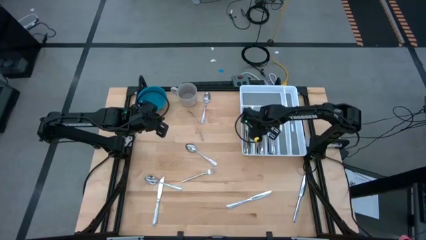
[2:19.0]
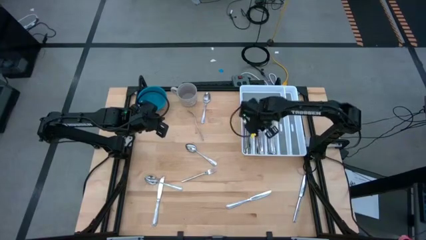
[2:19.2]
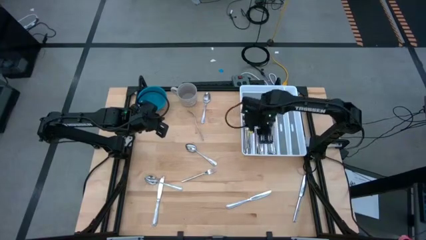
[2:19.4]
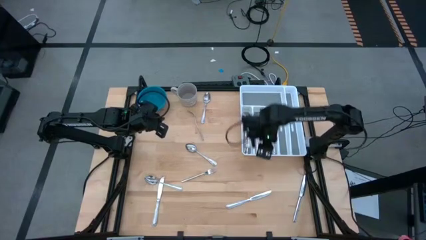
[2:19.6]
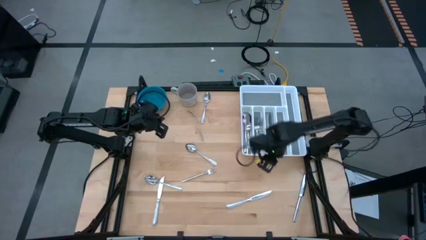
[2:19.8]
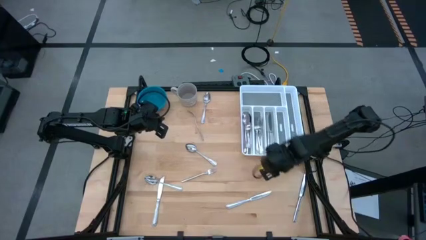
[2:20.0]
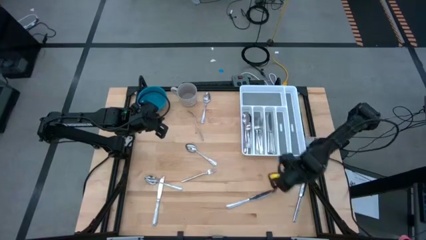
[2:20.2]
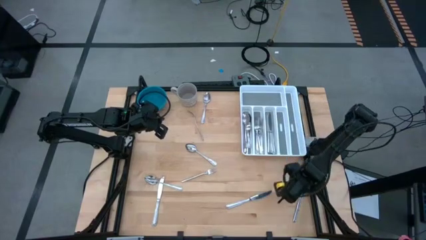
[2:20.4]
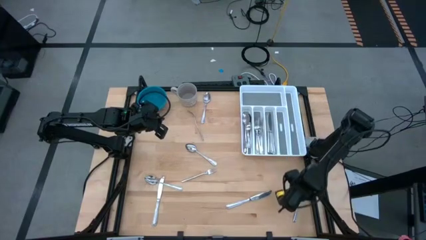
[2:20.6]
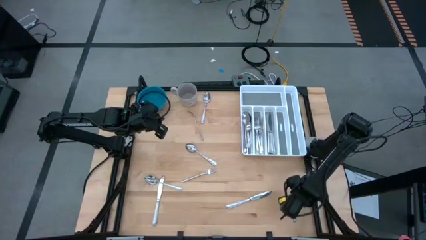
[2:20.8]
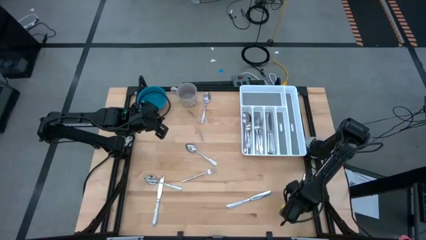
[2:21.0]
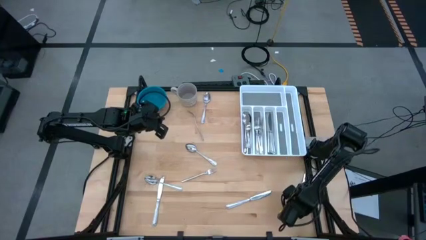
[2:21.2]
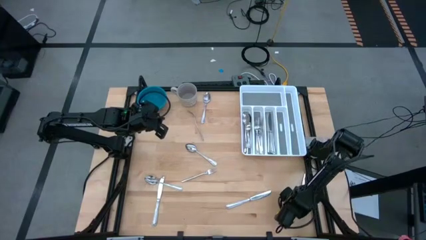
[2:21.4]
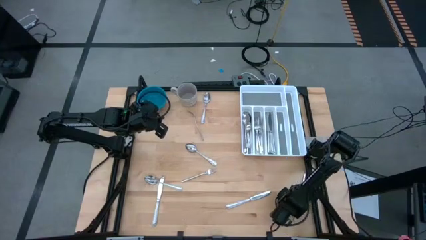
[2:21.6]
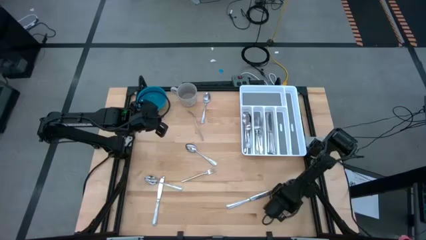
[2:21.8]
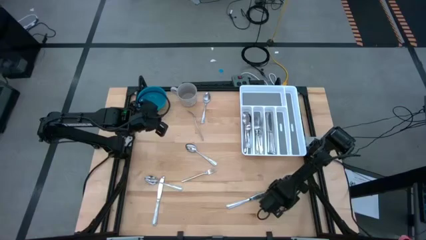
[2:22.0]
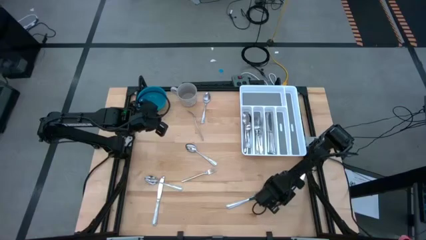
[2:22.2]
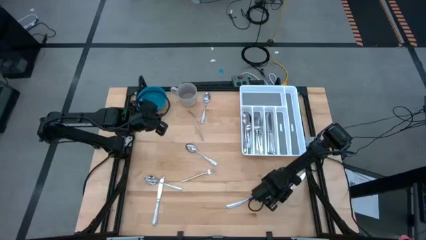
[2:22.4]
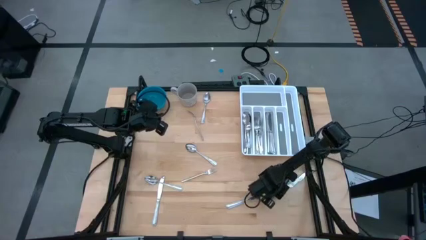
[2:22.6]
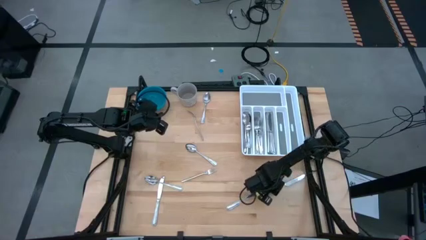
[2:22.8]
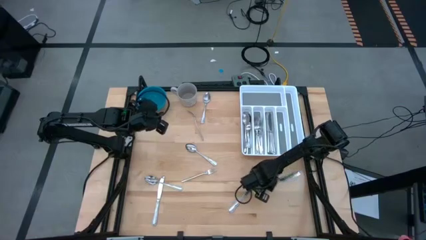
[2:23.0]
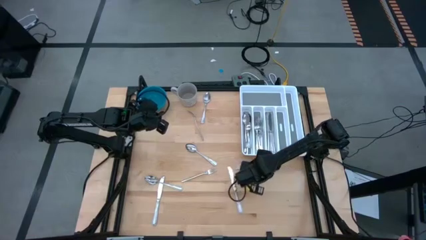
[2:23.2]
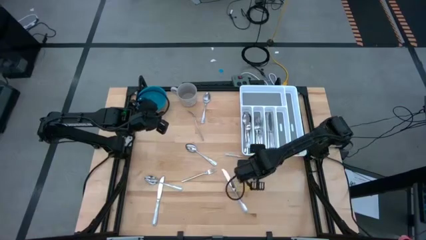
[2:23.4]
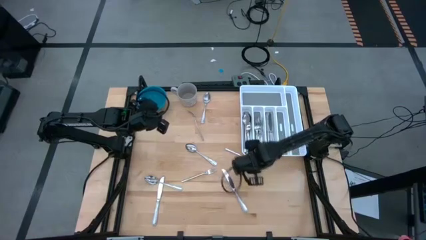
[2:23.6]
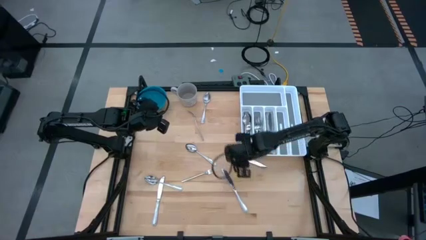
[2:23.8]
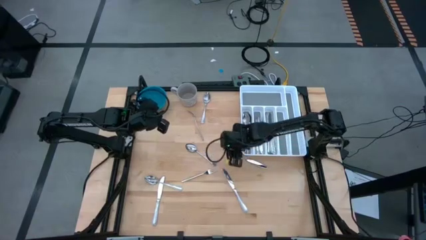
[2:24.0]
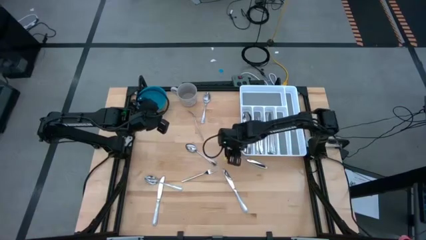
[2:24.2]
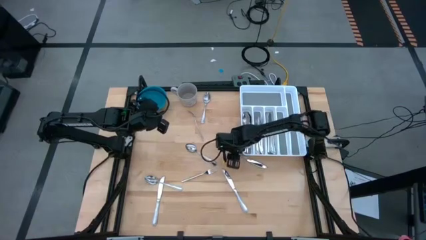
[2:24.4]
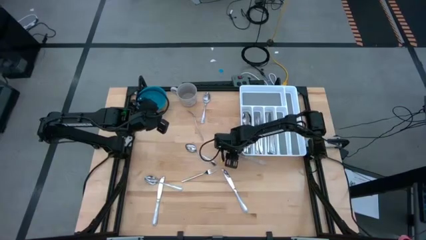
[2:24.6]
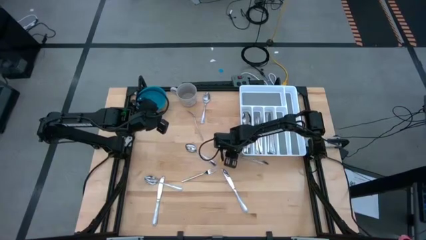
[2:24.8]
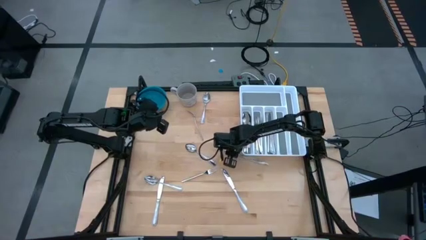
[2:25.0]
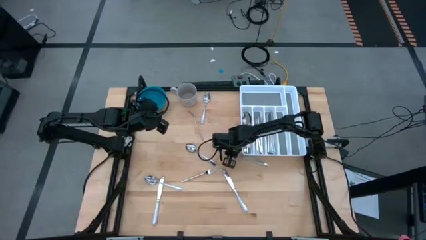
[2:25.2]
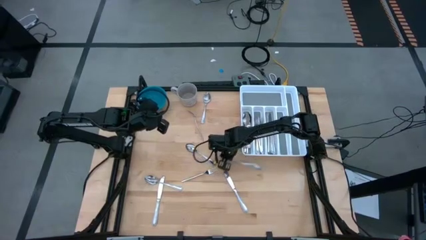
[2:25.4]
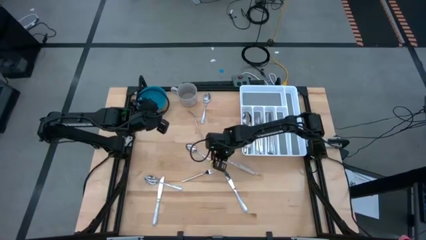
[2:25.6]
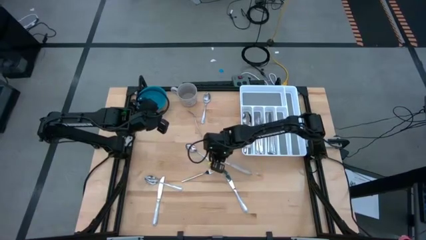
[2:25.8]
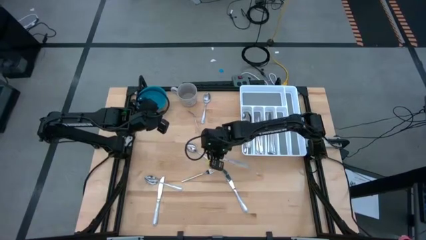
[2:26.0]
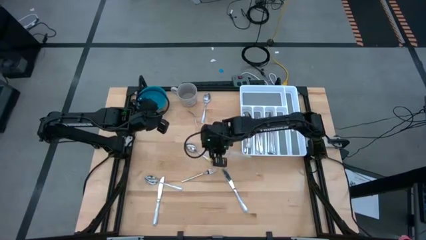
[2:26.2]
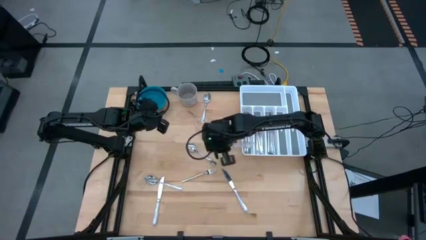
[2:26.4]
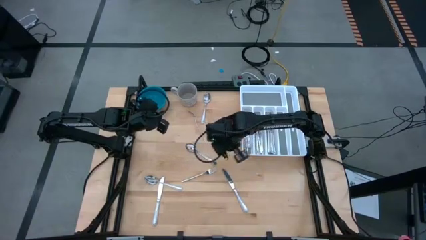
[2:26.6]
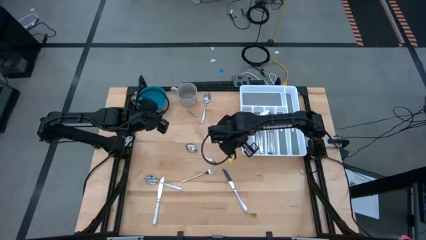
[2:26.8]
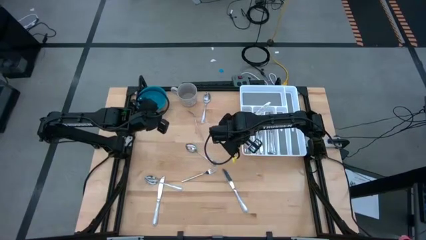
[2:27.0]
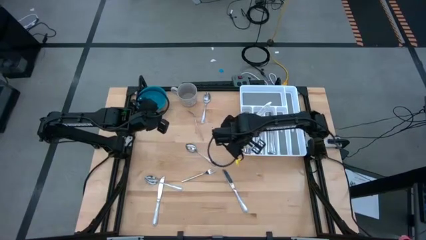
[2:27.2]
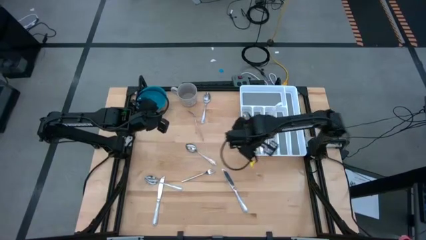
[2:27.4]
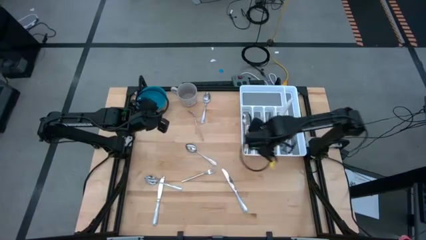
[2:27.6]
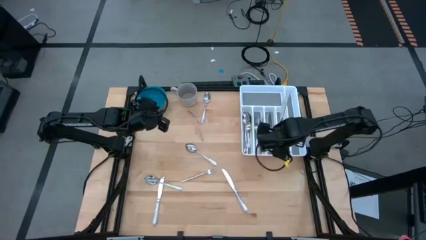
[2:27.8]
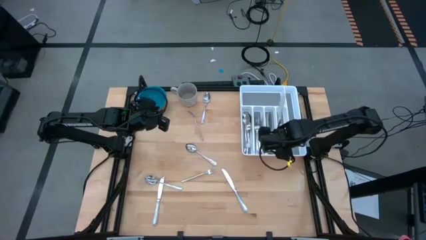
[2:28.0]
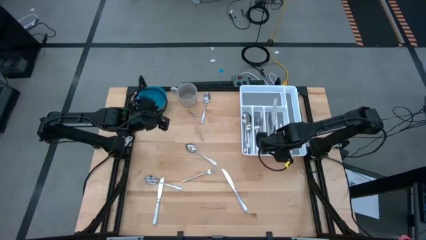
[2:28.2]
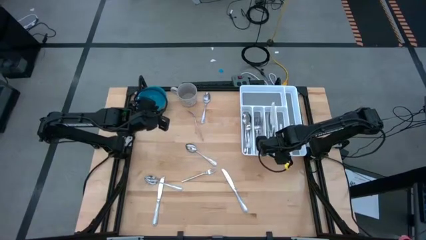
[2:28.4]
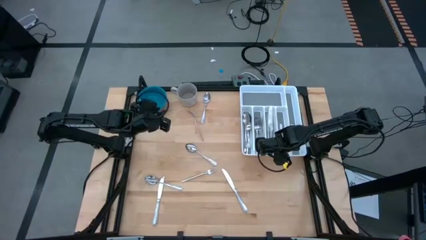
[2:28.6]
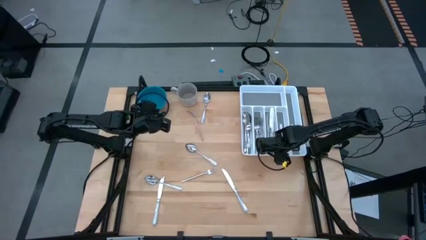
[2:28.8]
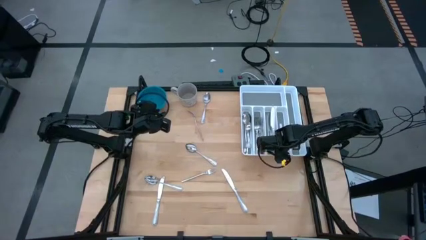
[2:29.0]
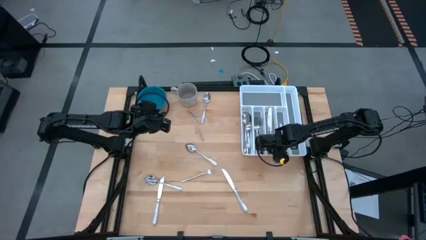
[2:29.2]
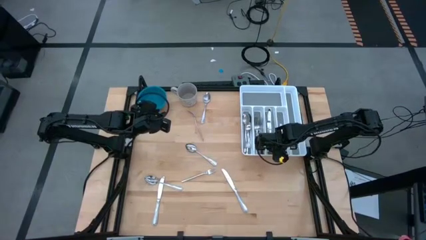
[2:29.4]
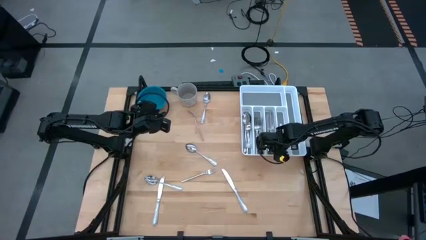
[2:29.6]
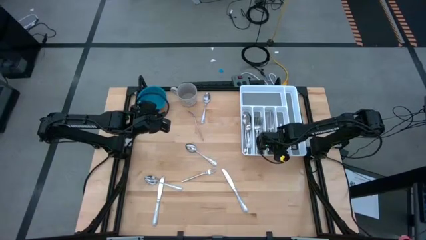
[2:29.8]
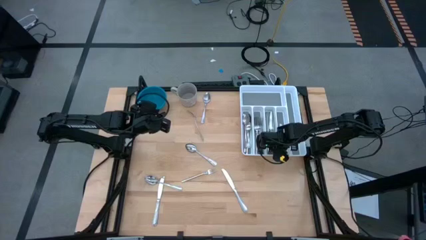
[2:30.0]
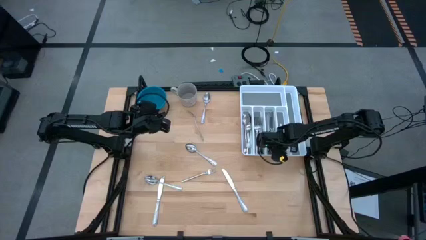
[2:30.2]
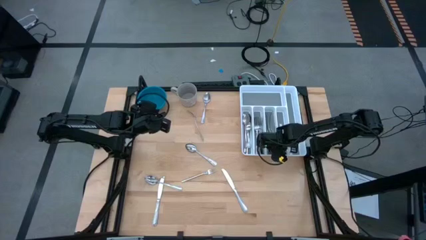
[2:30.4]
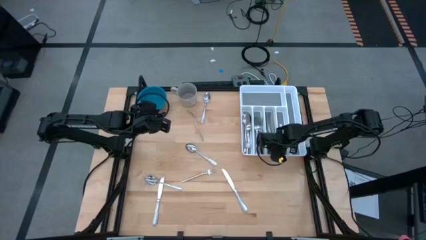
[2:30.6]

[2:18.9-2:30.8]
Task: Sort silverware
Put the table knife in the silverware tray

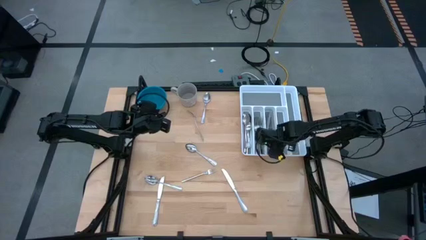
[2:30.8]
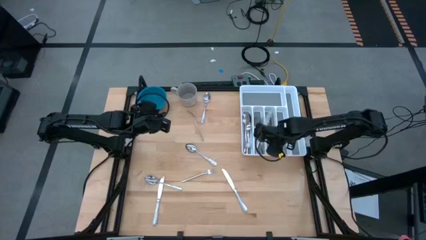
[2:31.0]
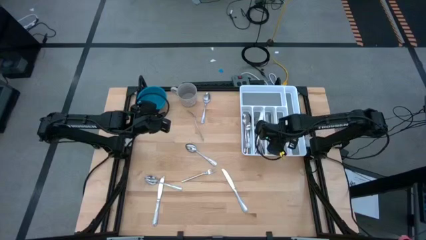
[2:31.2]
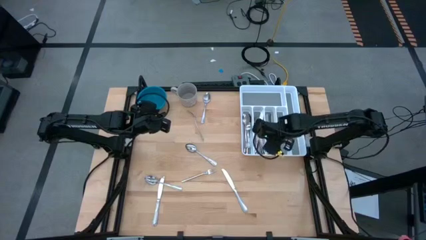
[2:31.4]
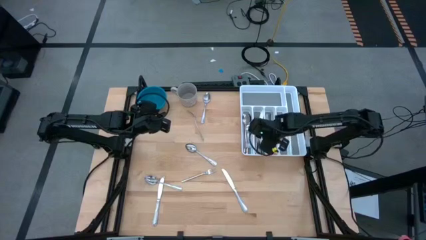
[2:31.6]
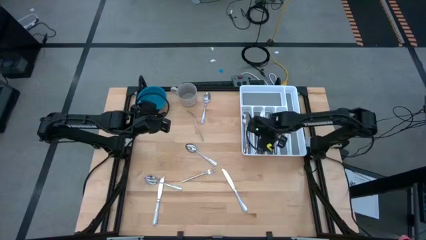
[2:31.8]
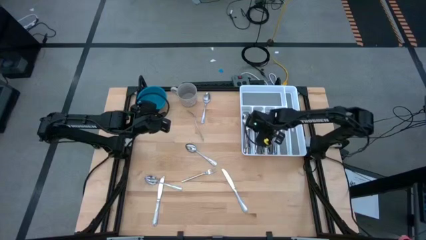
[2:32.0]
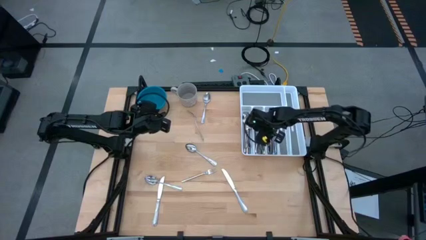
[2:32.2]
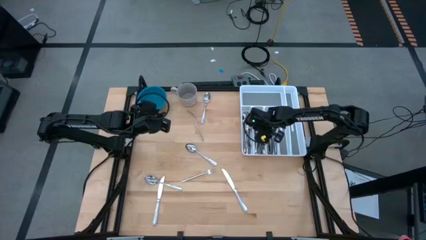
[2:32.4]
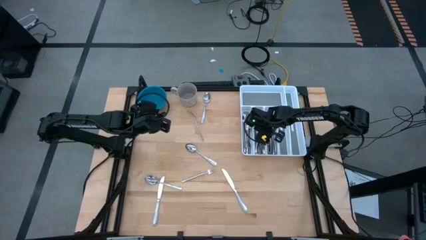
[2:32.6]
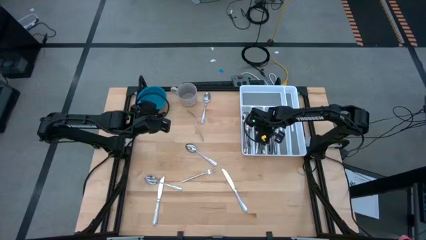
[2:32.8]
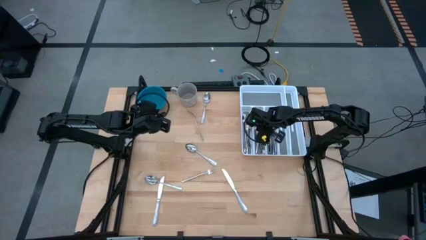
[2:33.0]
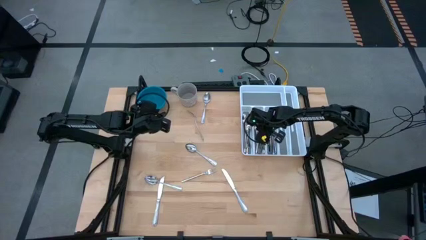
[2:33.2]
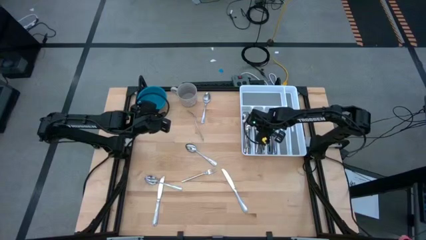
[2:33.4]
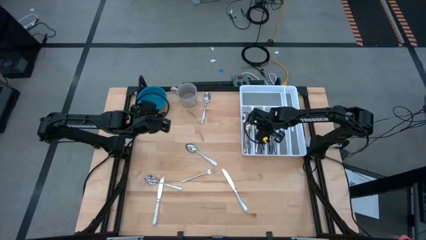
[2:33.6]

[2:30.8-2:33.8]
Adjust the table knife on the silverware tray

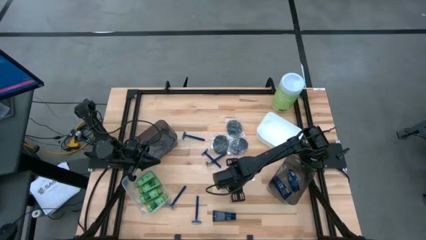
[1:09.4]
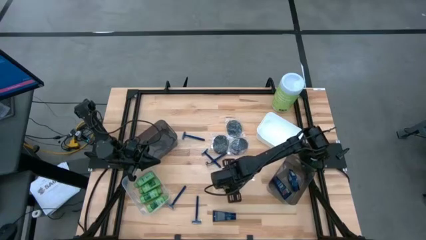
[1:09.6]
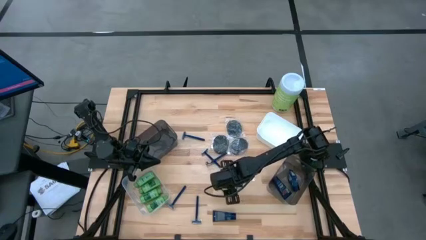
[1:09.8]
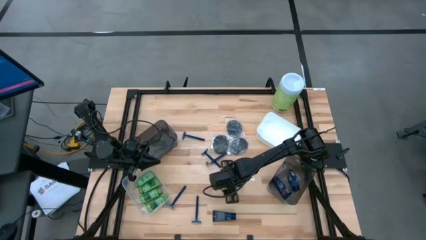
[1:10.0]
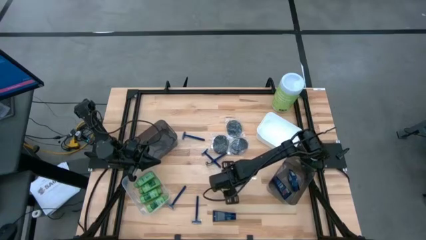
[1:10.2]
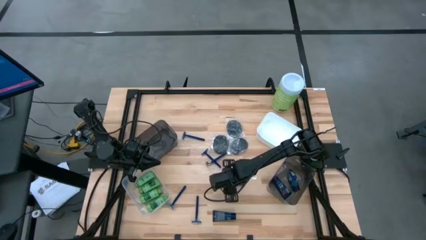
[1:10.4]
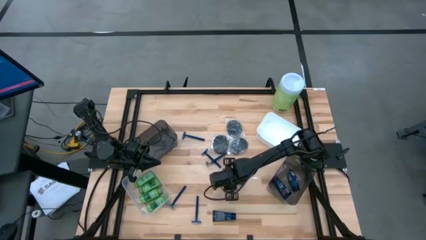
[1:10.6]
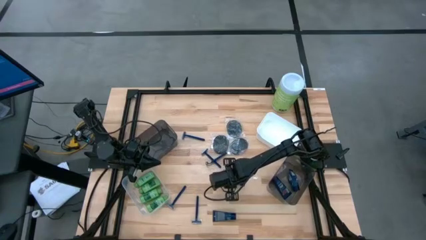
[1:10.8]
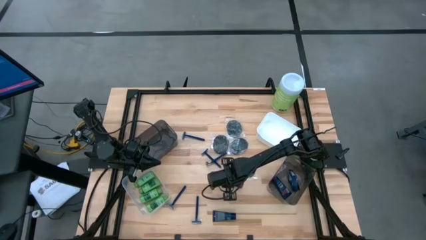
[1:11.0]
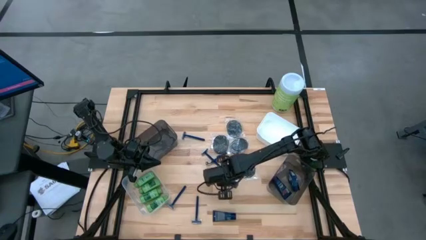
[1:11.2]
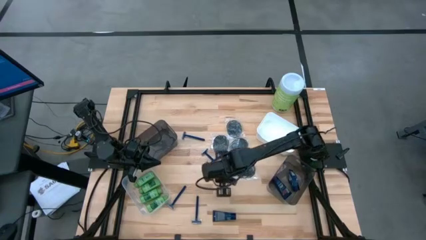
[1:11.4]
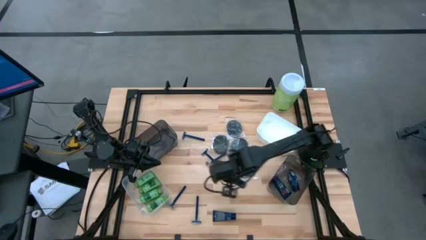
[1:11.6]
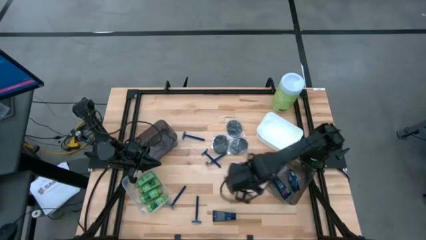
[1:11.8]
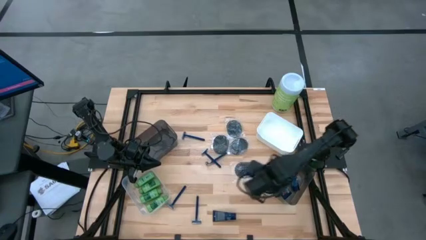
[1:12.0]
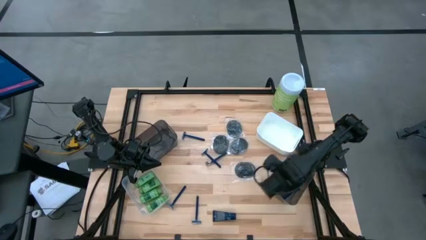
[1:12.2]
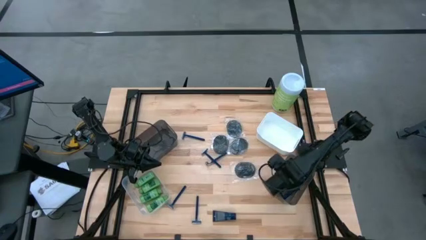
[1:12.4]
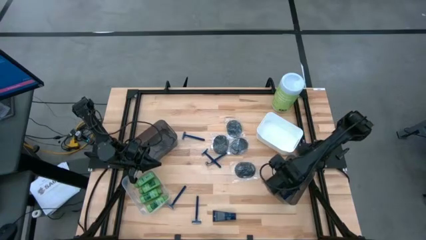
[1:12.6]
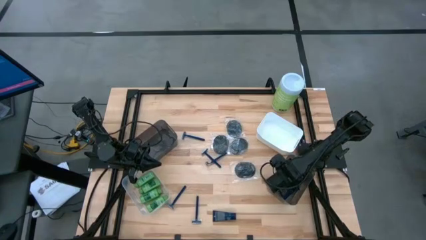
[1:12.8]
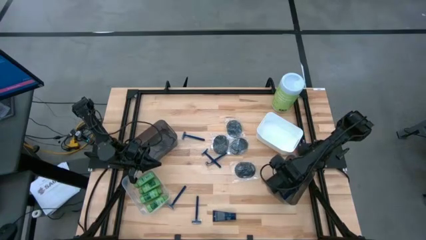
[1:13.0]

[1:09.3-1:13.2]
Task: Pick & Place Travel size toiletries
Put the blue shave cream into the right black bin
